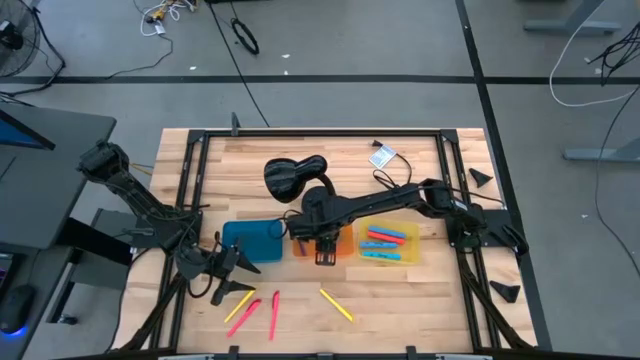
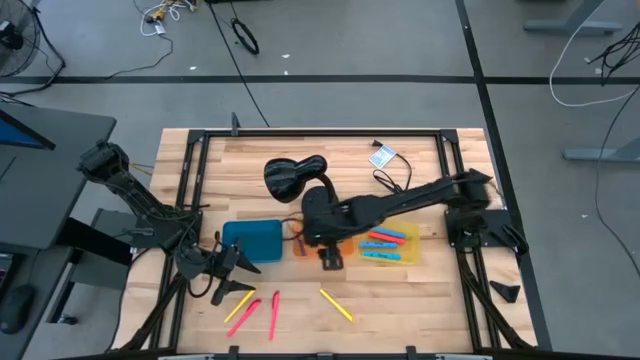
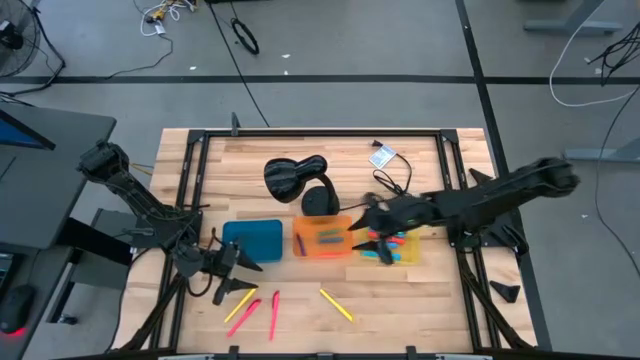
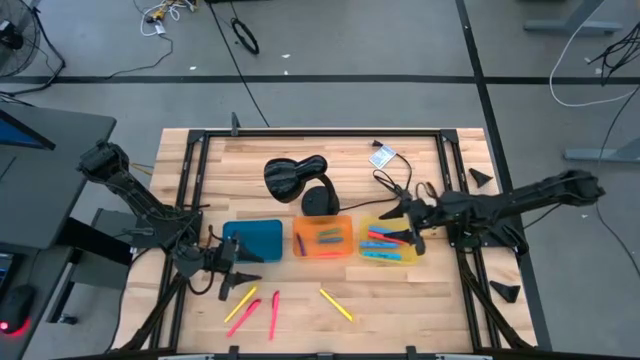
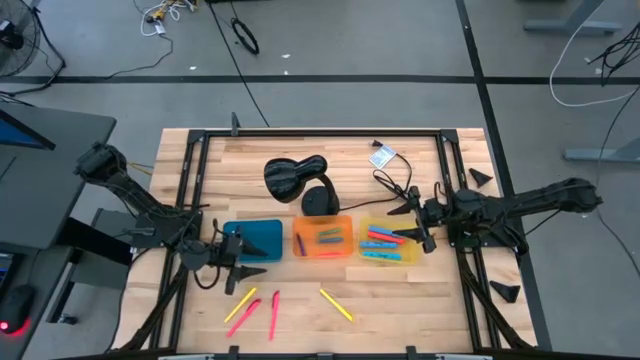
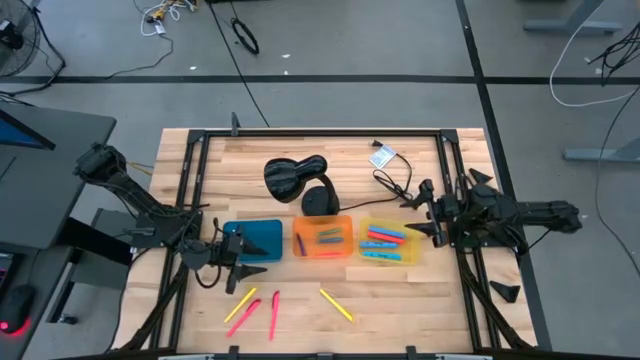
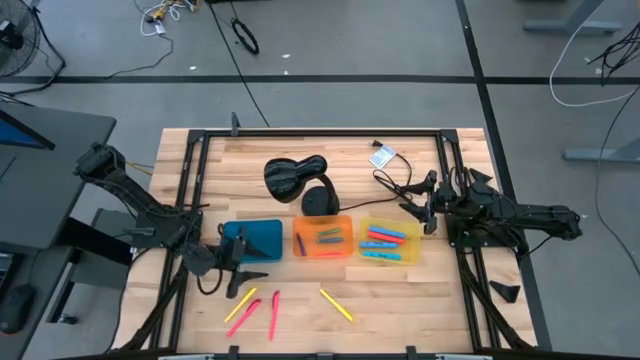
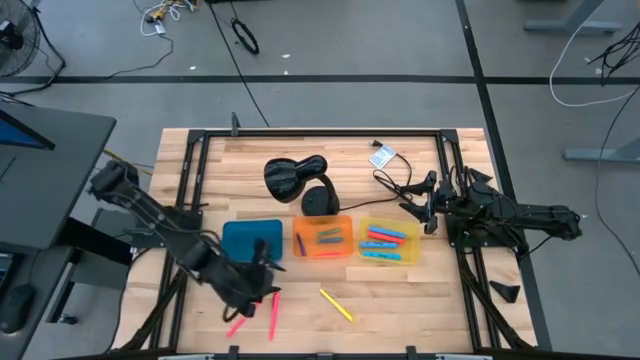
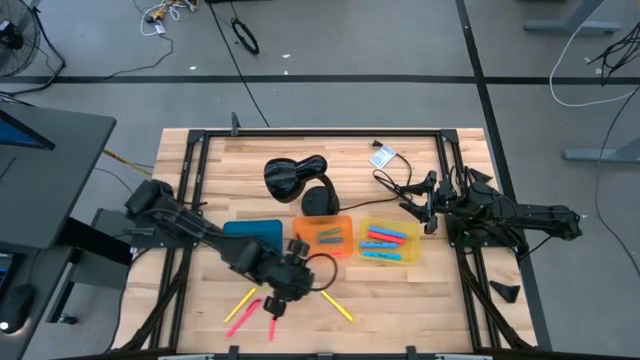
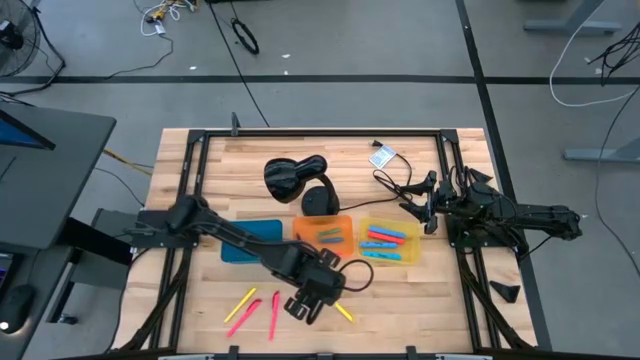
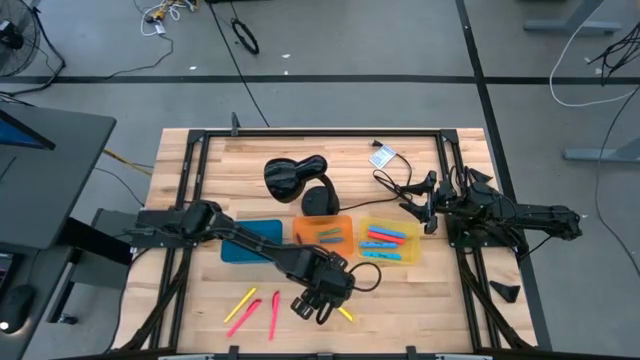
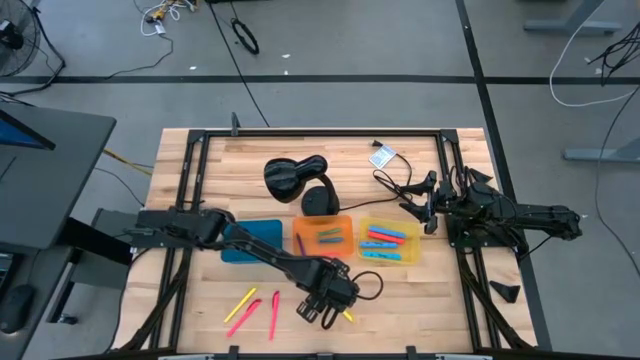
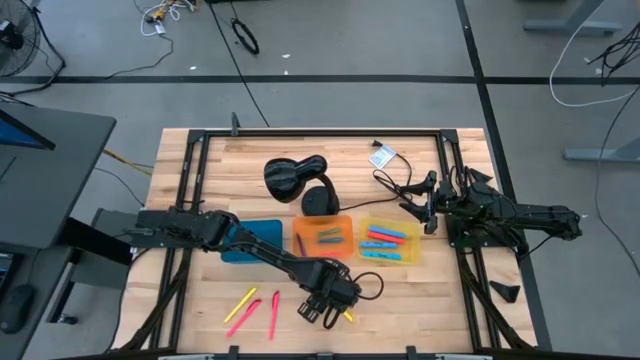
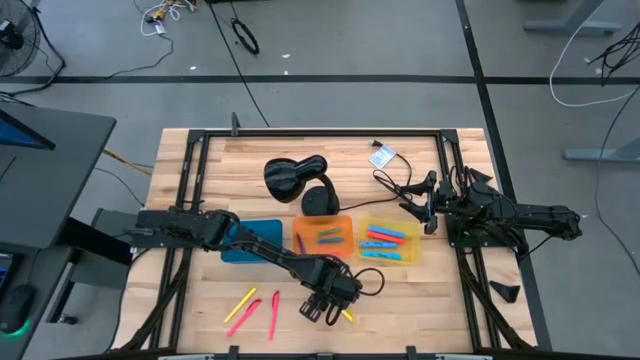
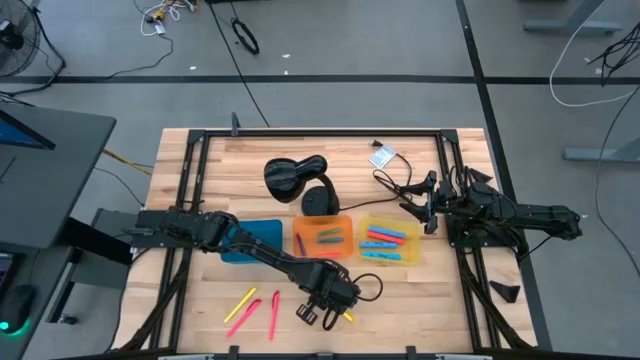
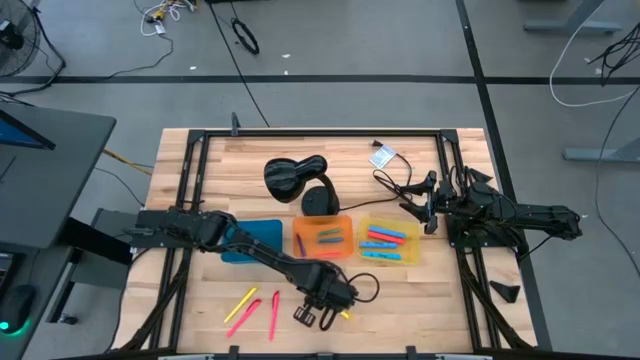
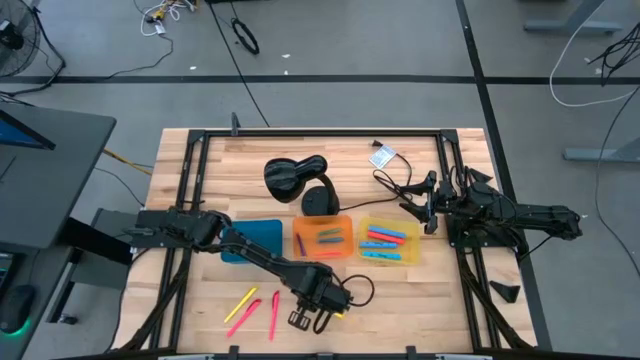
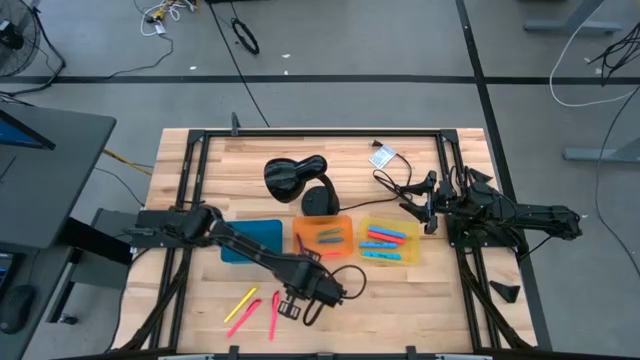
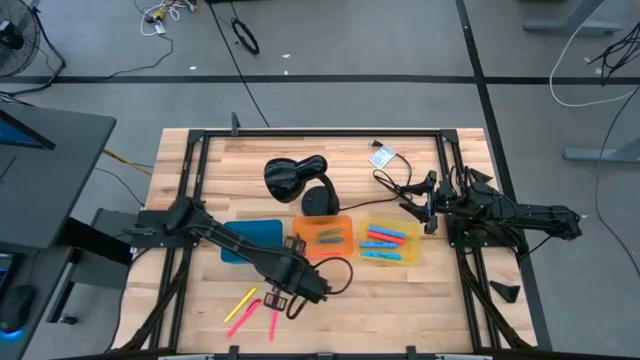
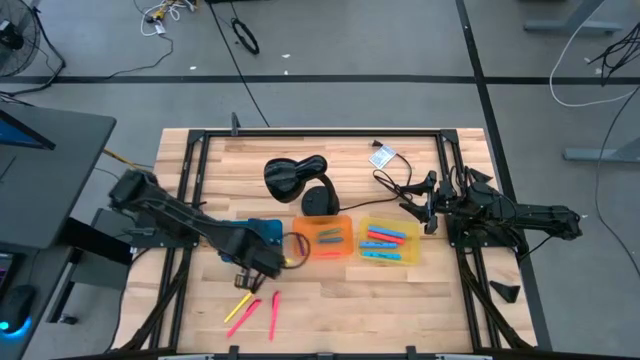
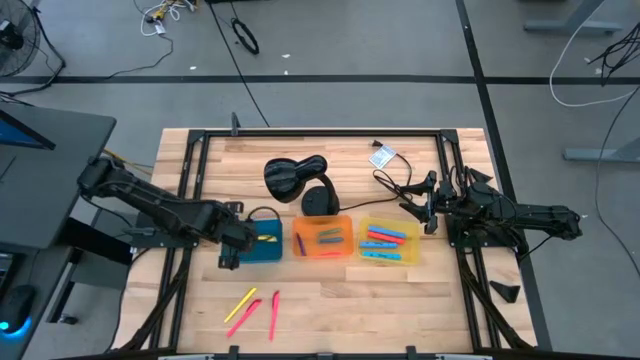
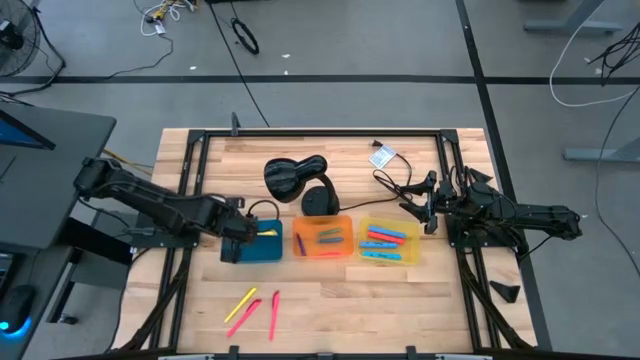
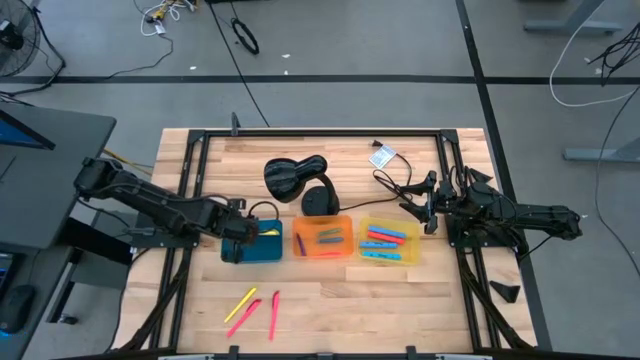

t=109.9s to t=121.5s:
Task: Pick & Place Markers
Put the right yellow pen into the blue bin

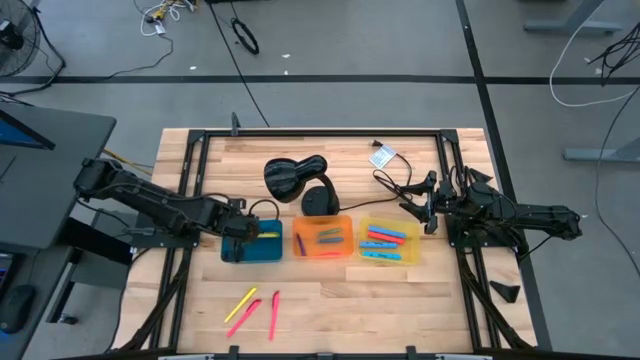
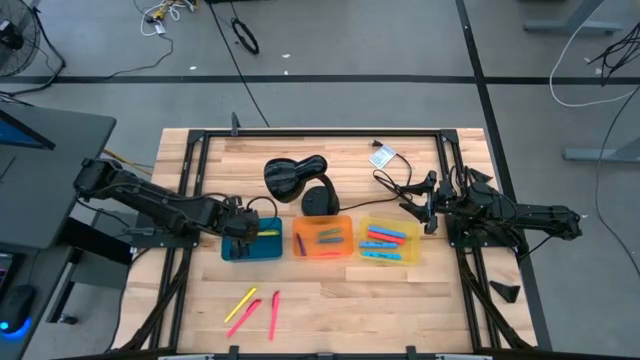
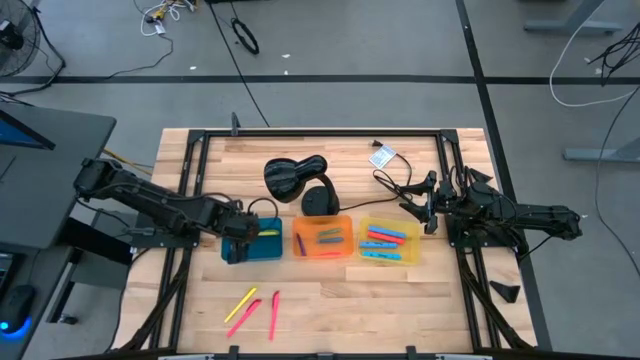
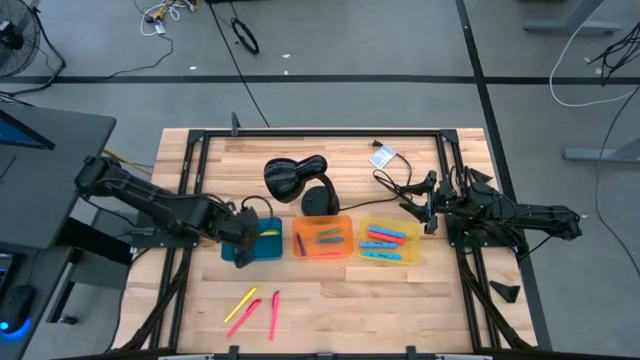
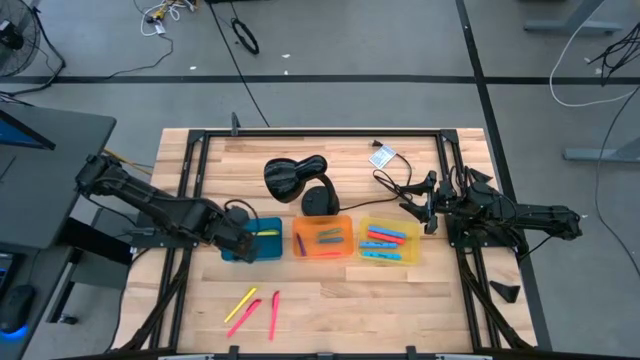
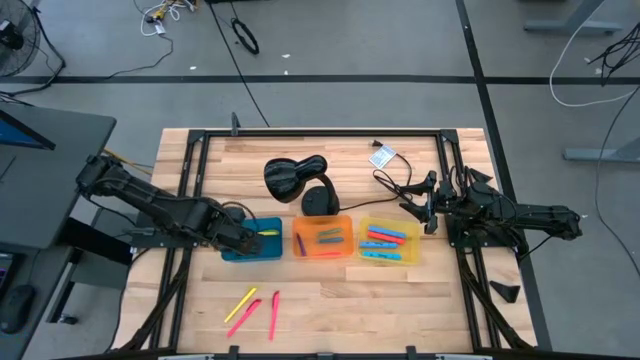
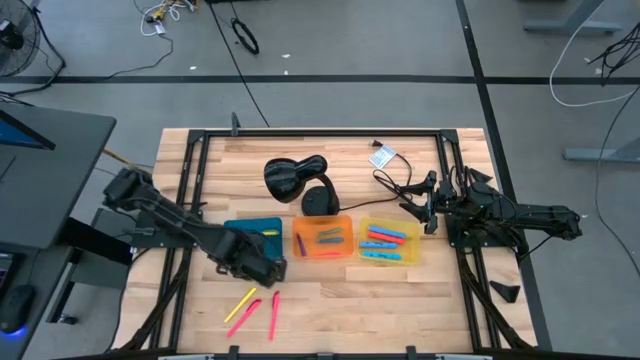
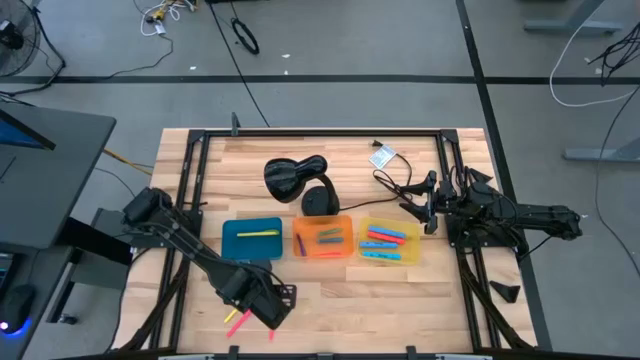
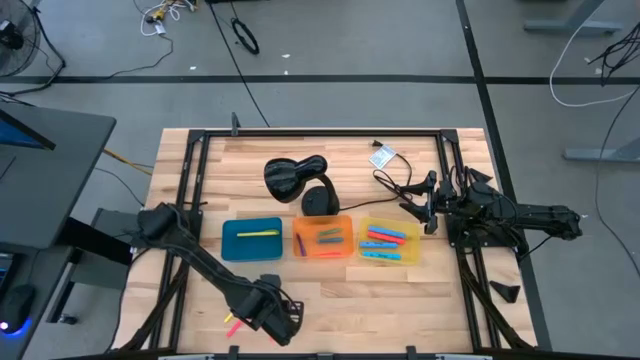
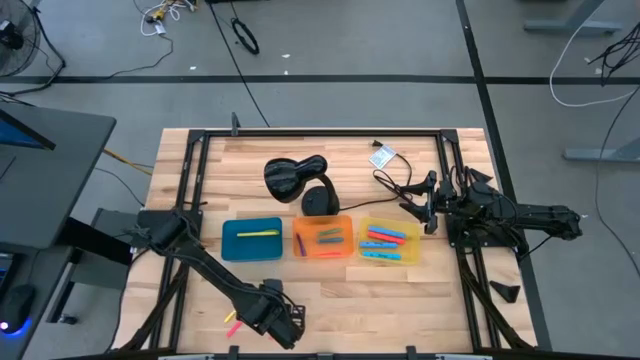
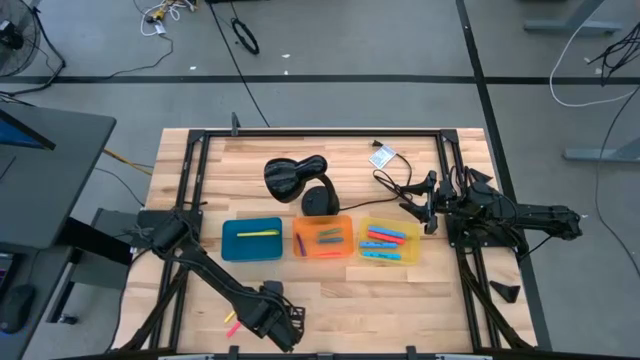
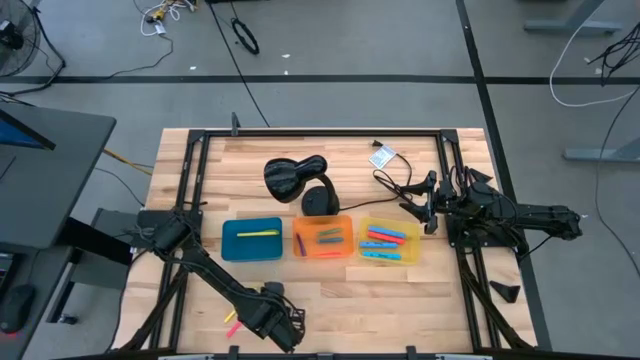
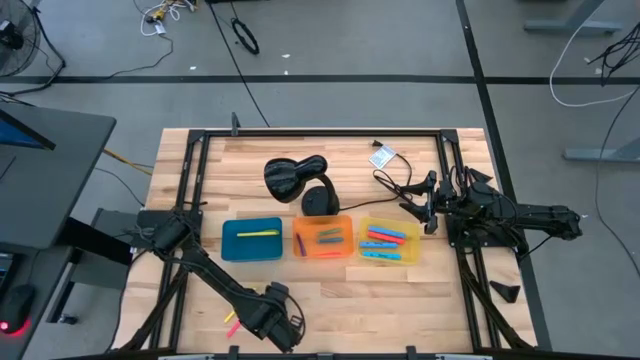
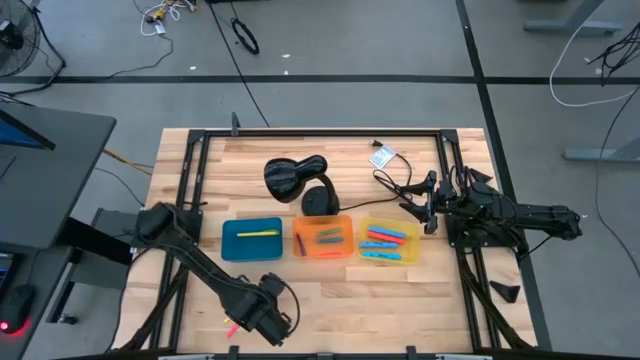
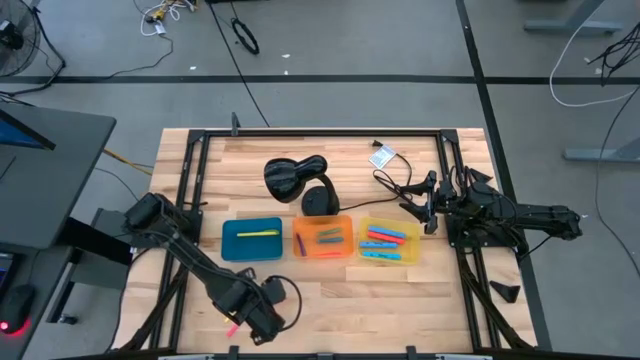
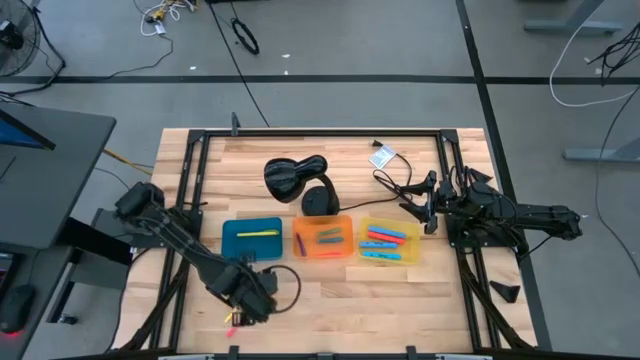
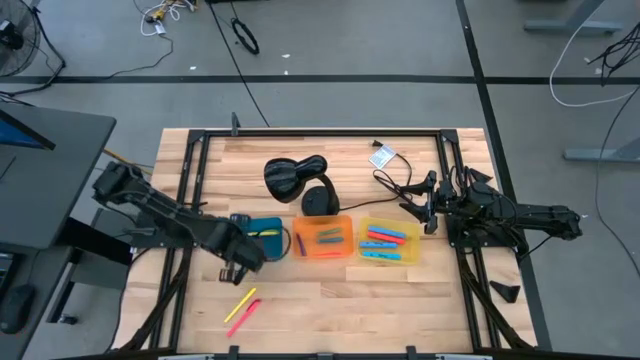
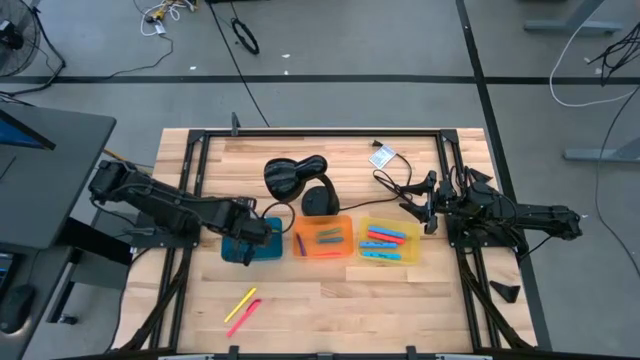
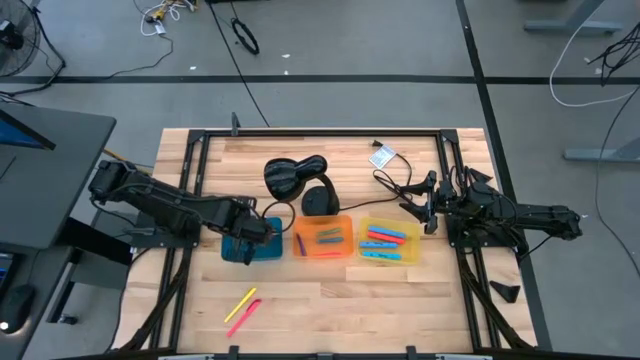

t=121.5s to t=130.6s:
Put the right pink pen into the blue bin
